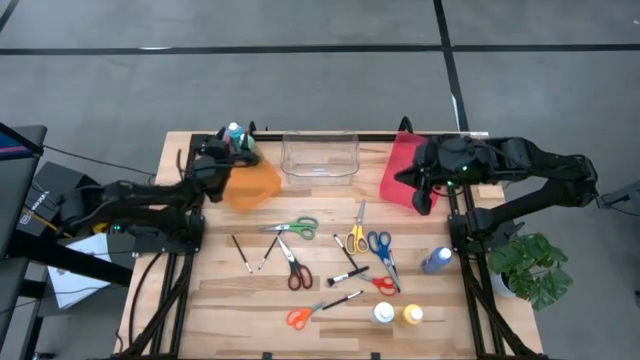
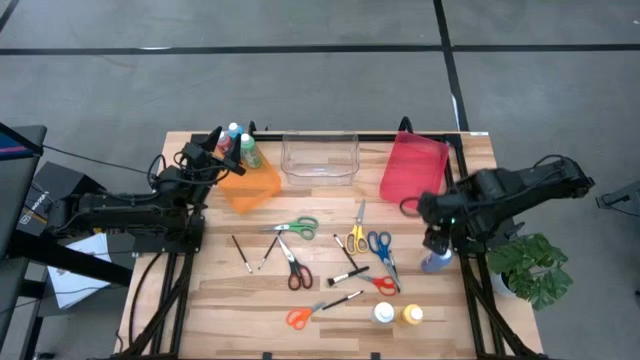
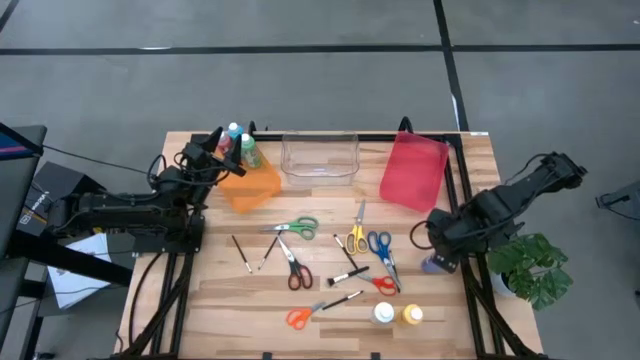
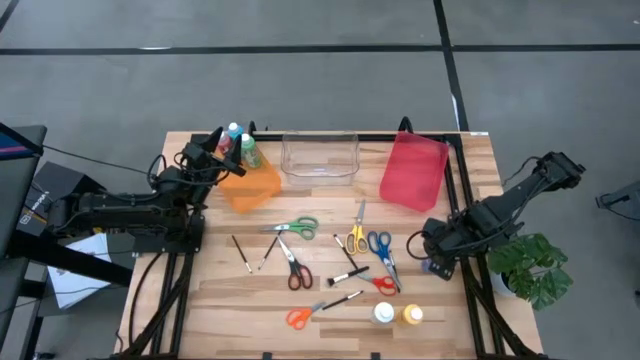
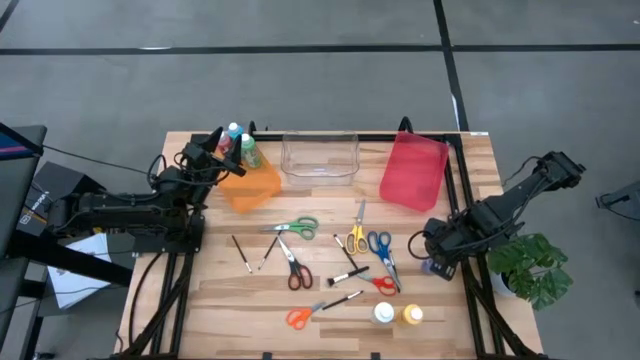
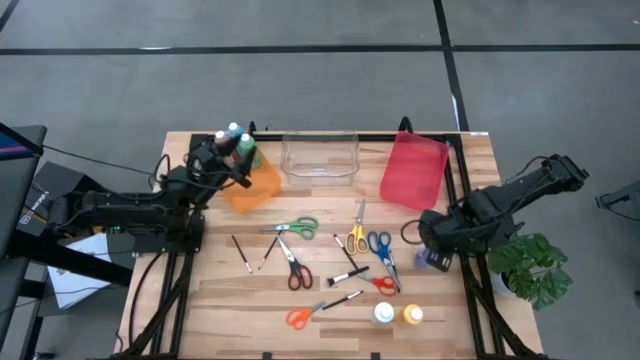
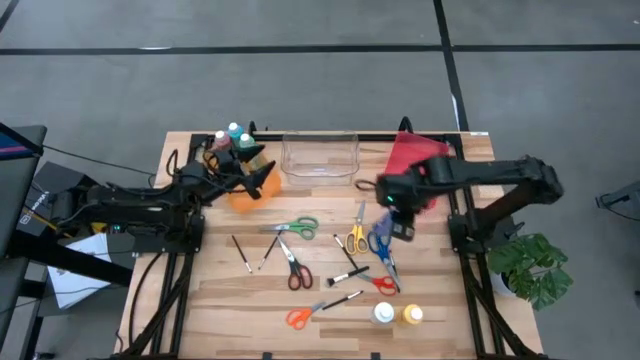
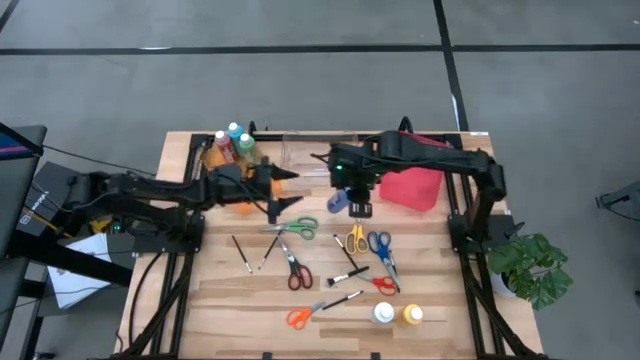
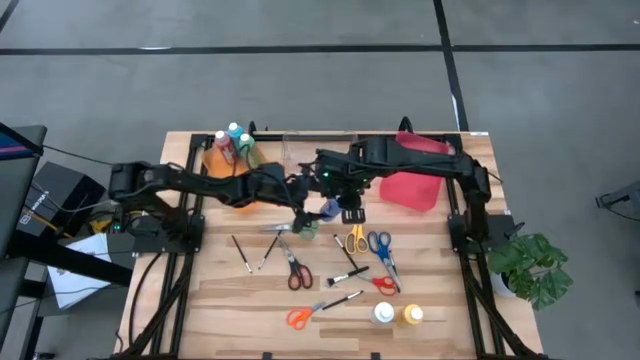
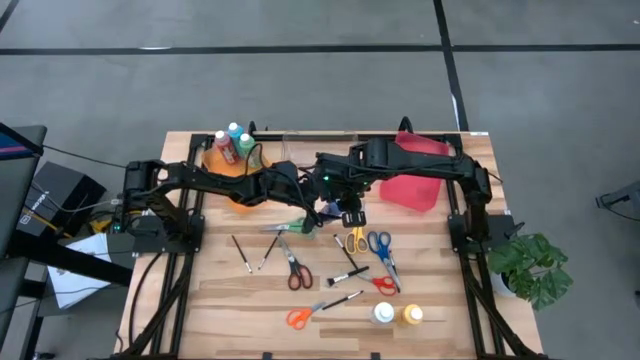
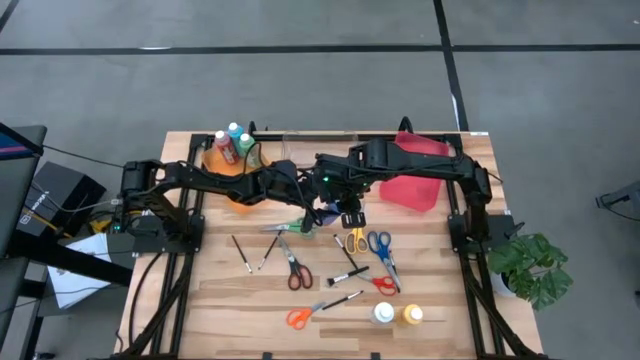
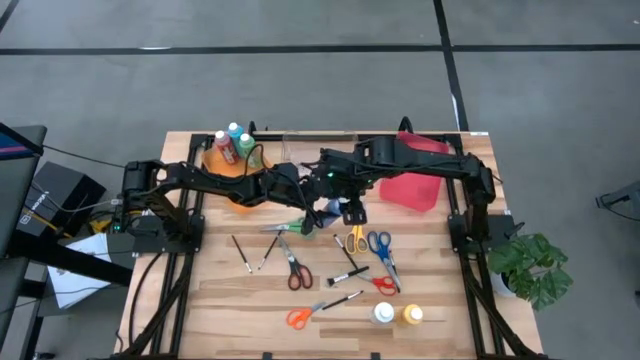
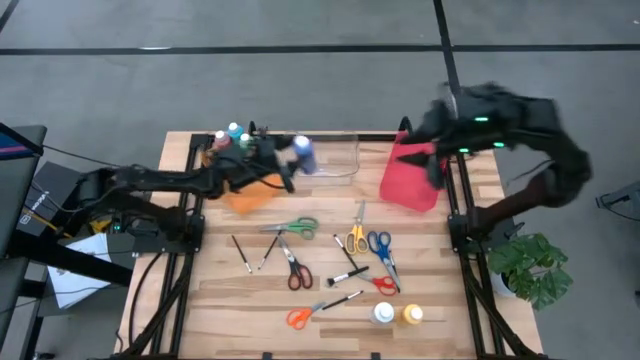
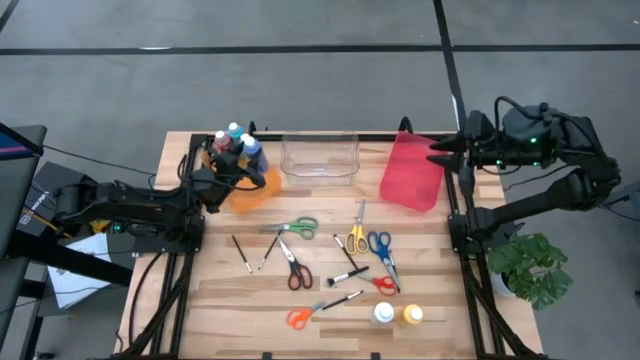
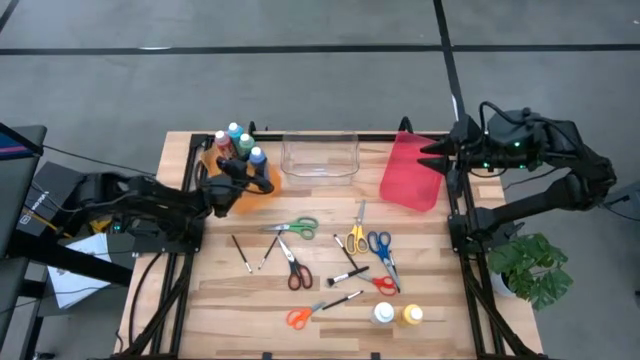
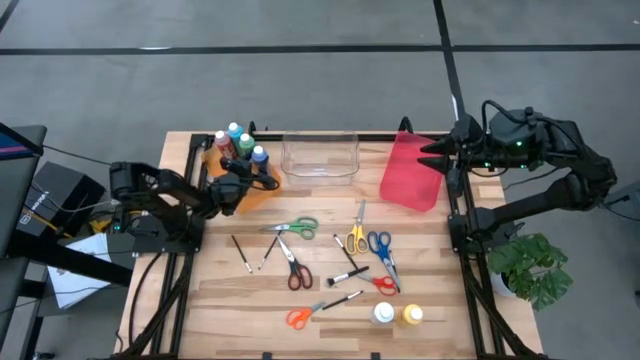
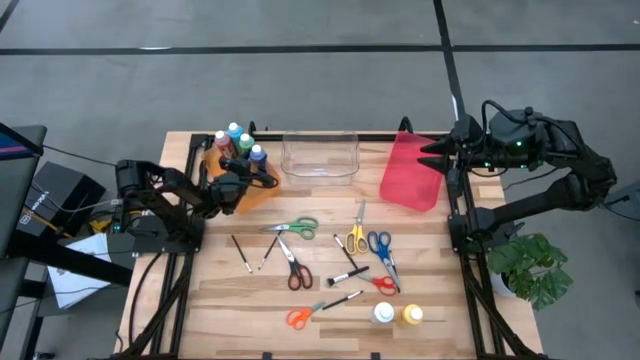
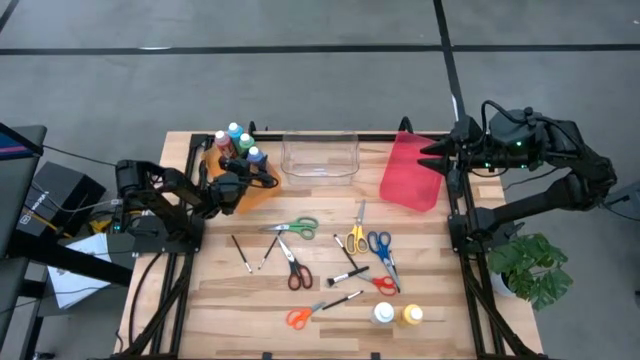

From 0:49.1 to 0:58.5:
Task: Pick & Place Paint Supplies
Put the blue paint bottle into the orange bin

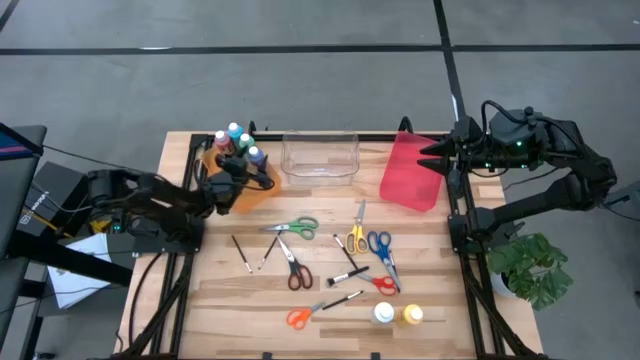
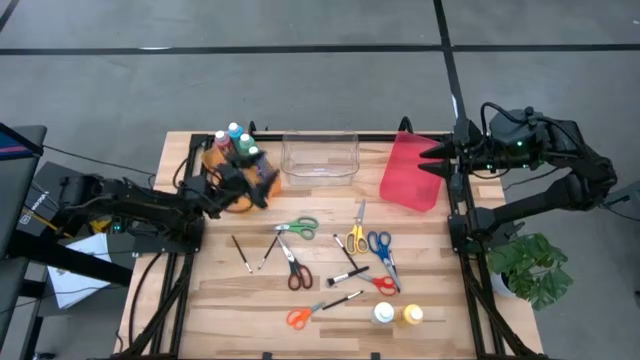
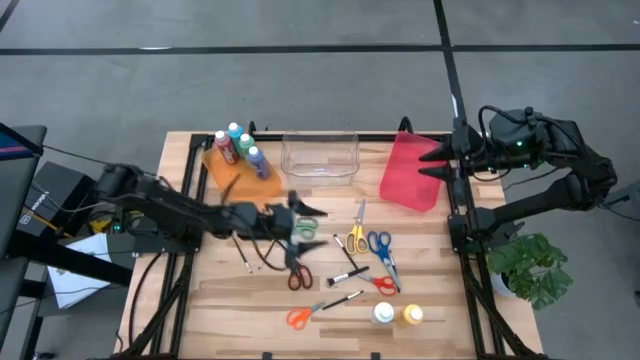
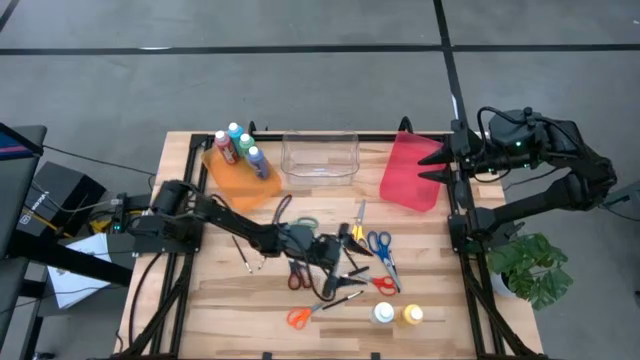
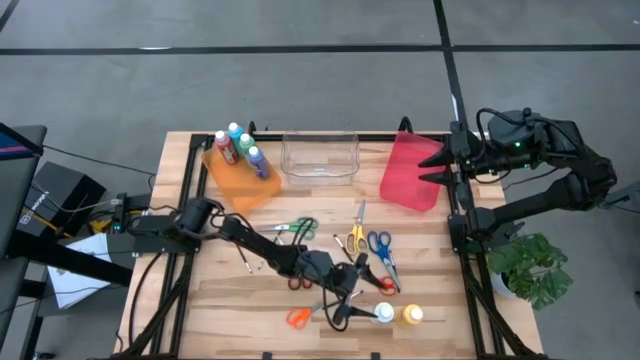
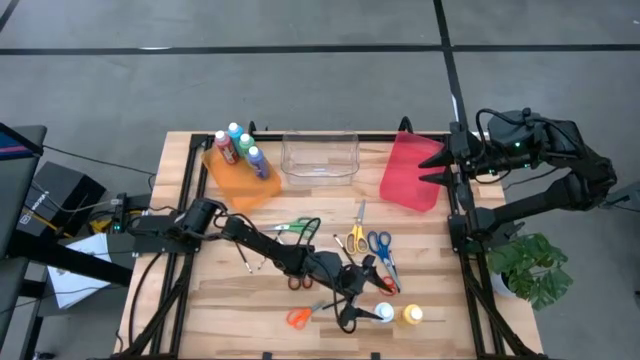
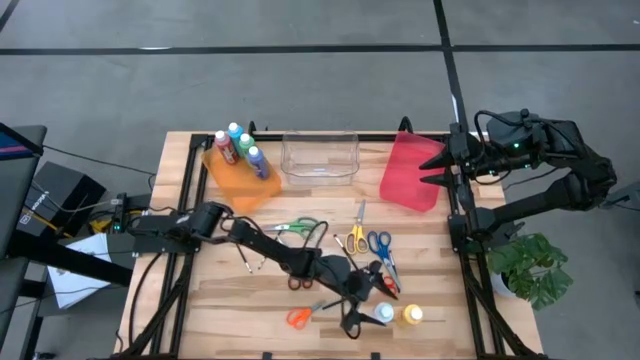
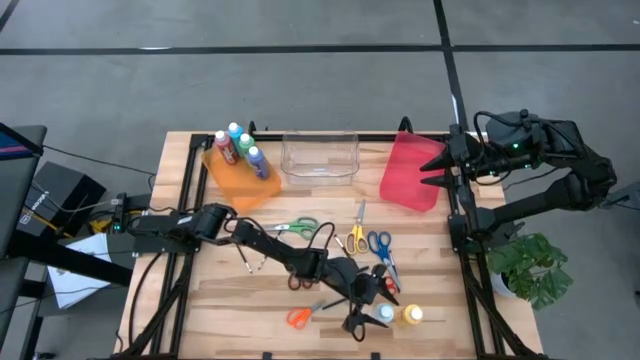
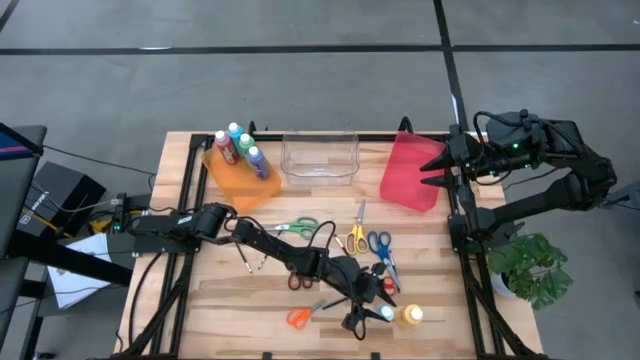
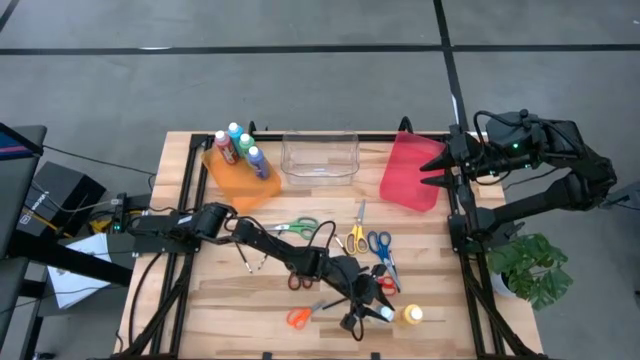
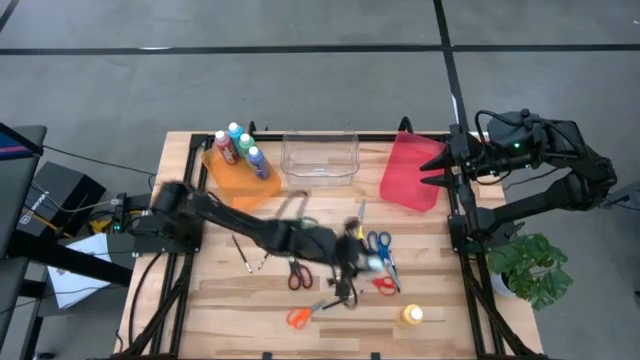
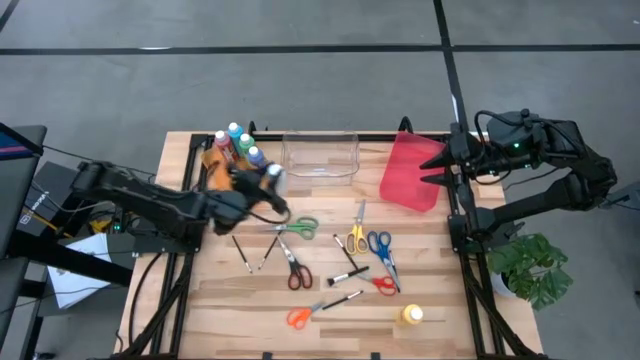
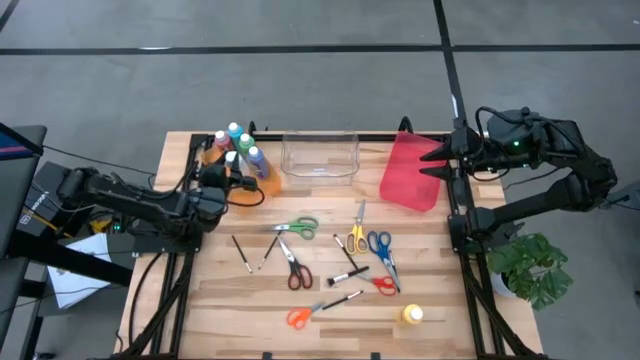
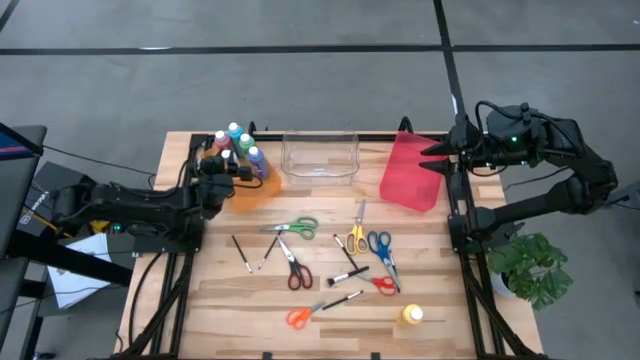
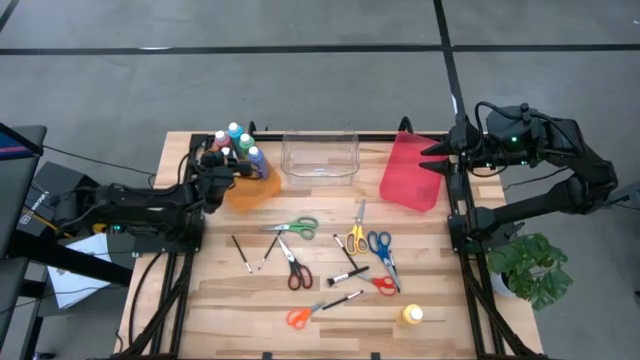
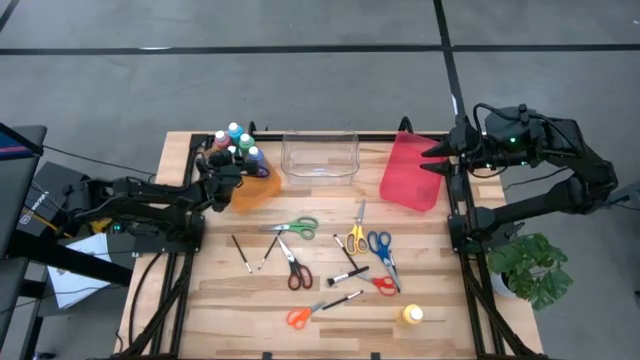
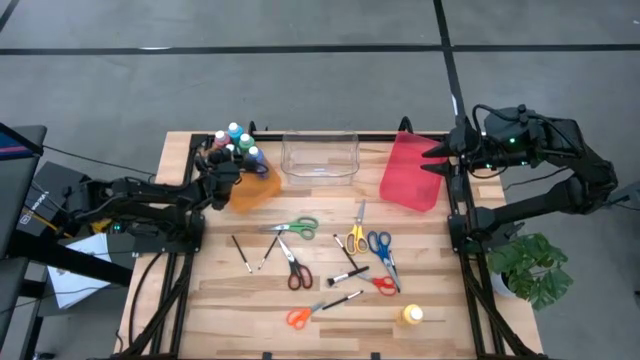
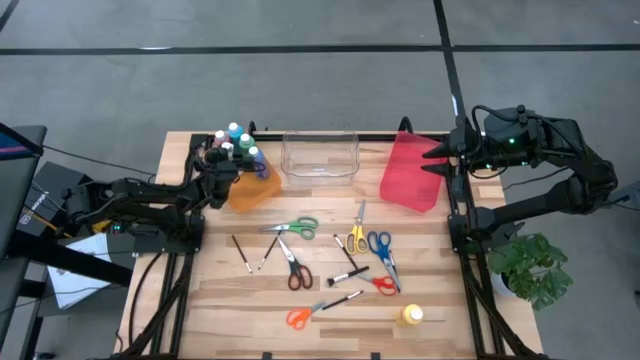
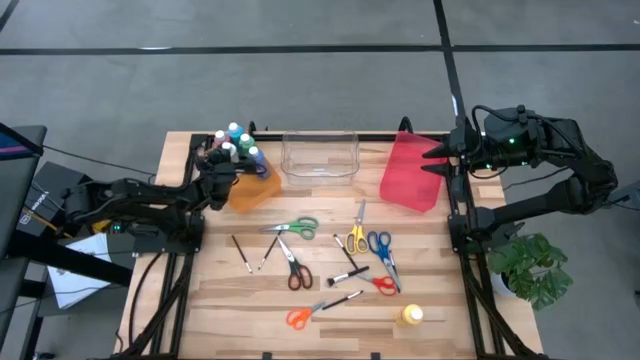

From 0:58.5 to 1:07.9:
Put the white paint bottle into the orange bin

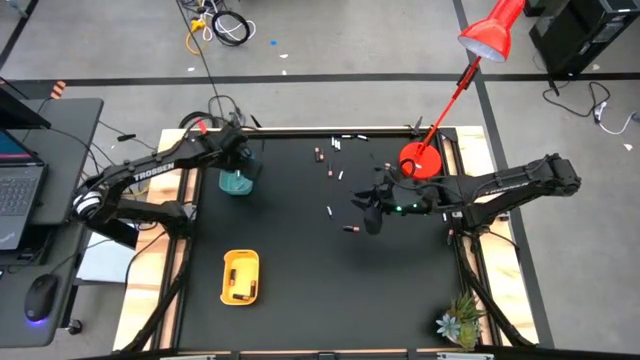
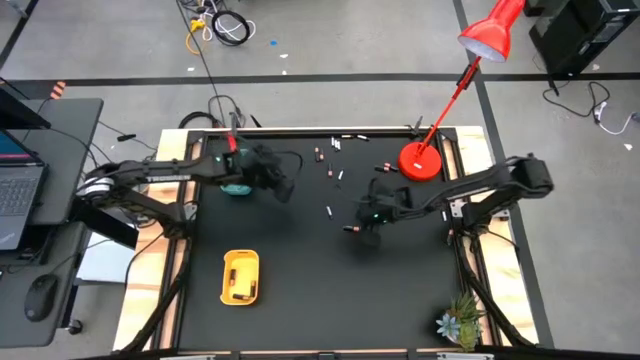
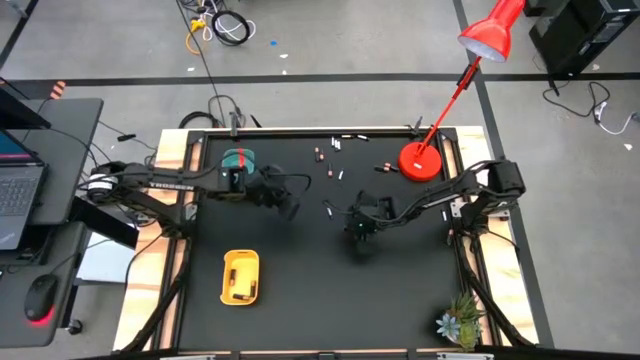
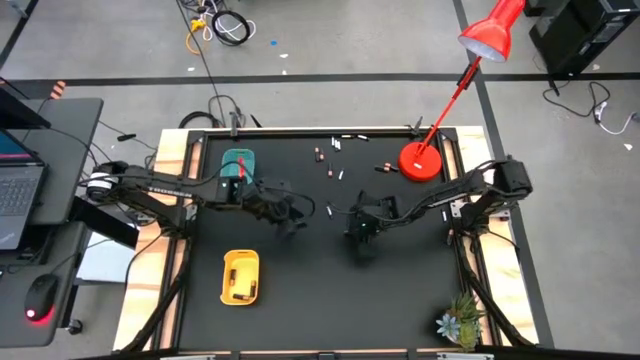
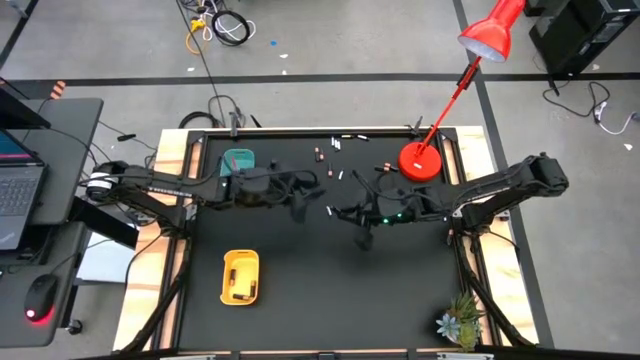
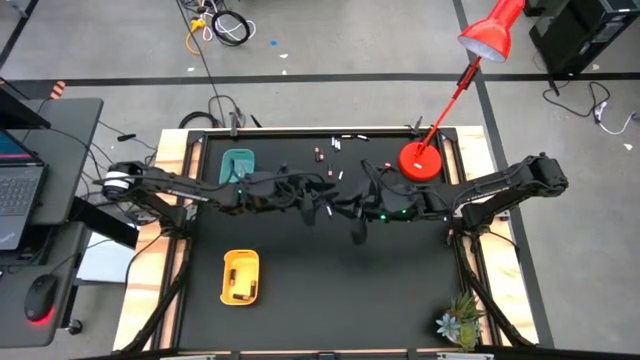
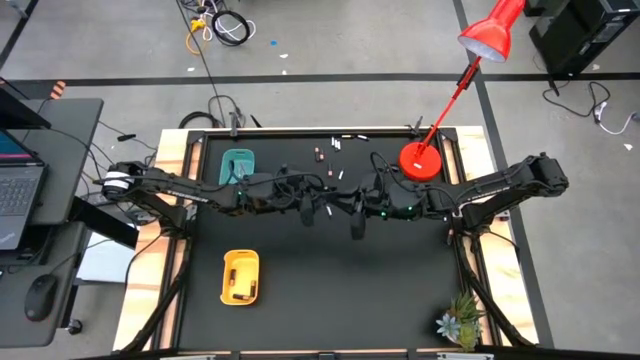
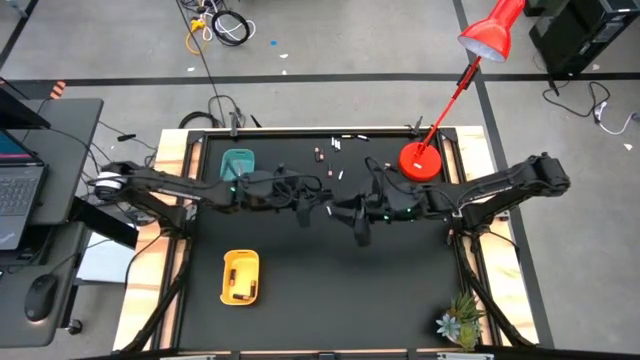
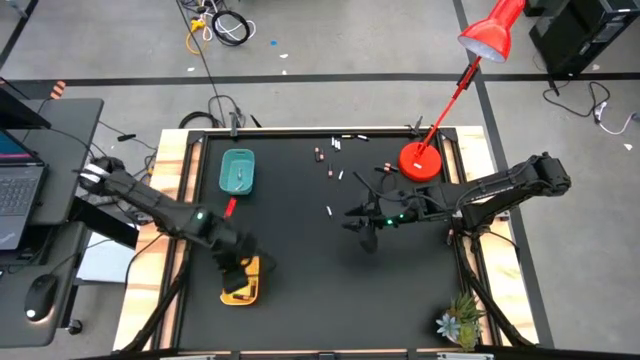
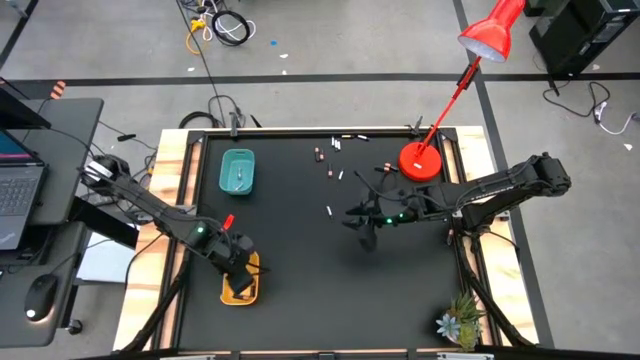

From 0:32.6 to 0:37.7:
Task: Sort batteries
Put the black battery into the yellow bin
